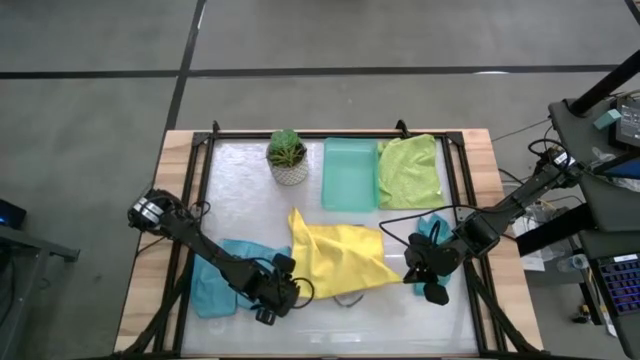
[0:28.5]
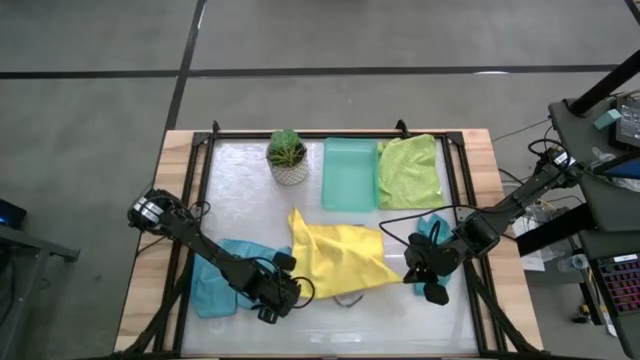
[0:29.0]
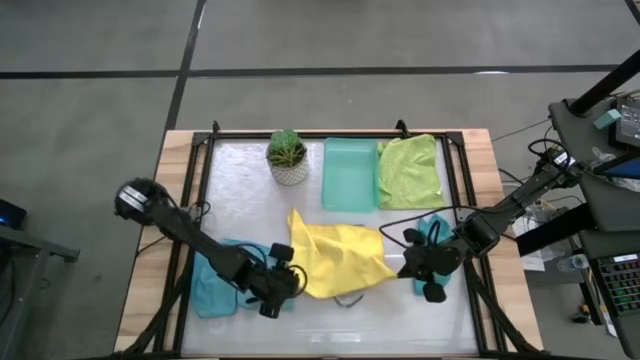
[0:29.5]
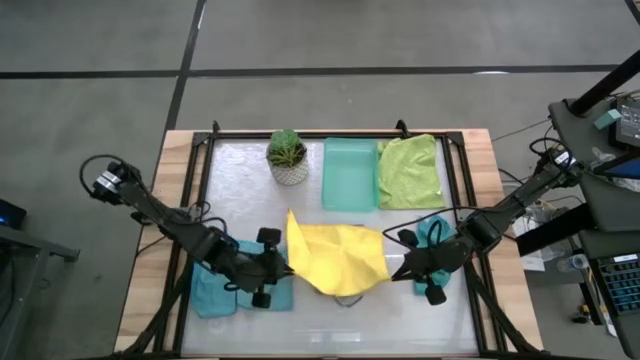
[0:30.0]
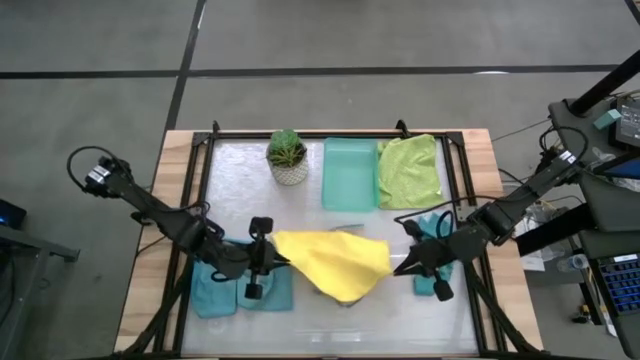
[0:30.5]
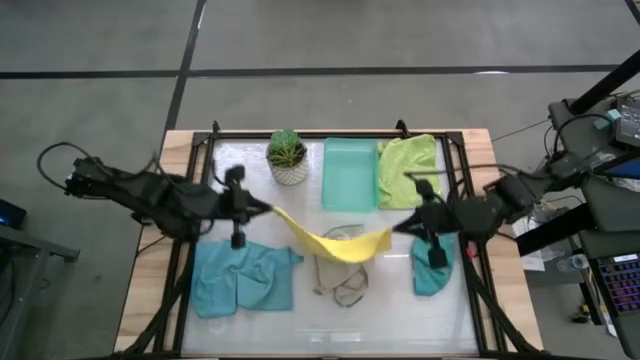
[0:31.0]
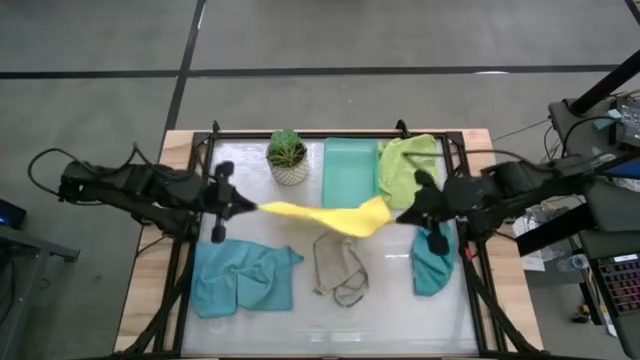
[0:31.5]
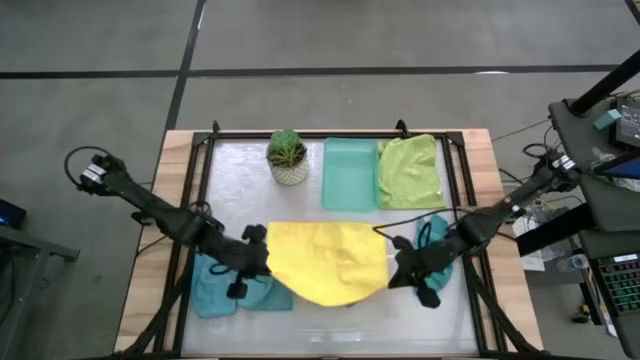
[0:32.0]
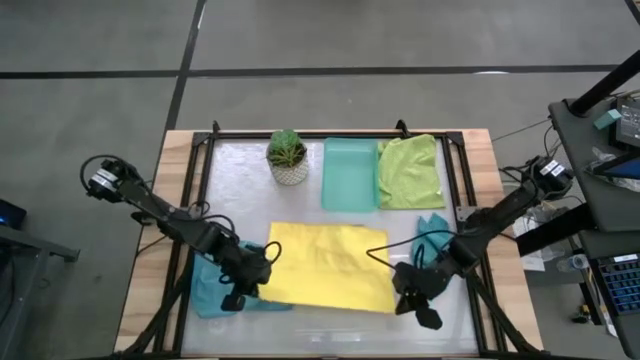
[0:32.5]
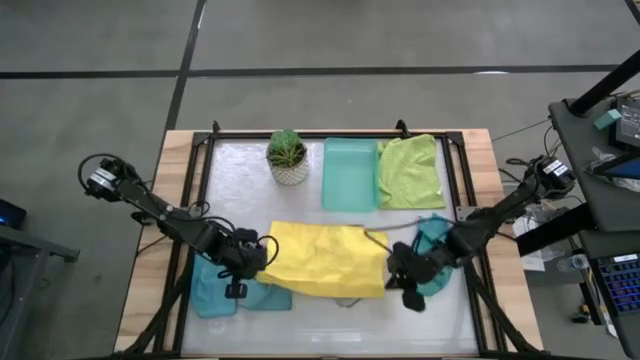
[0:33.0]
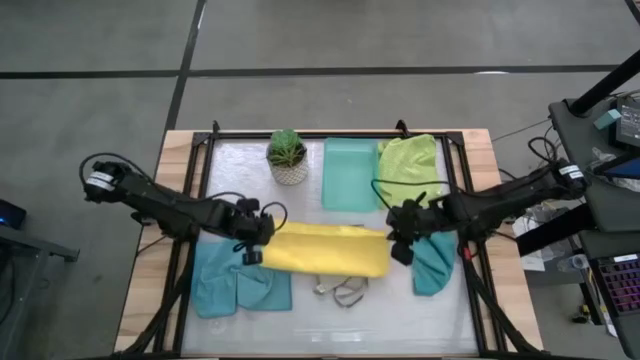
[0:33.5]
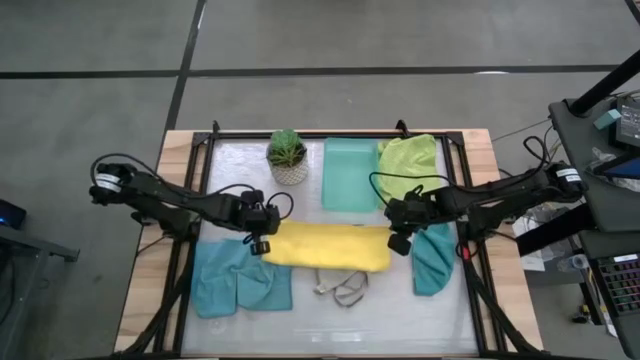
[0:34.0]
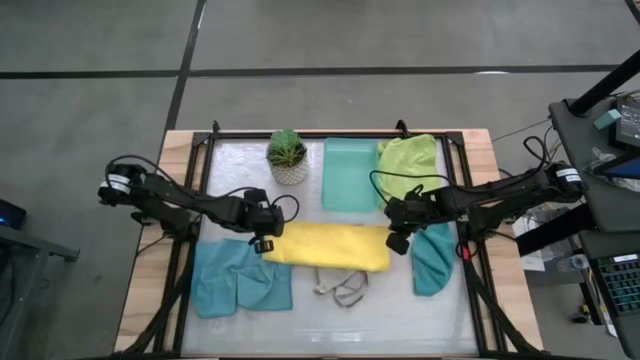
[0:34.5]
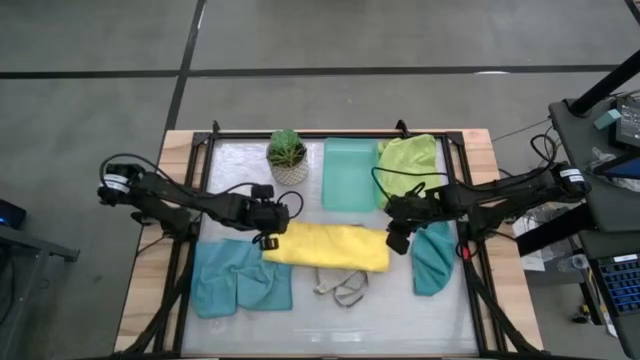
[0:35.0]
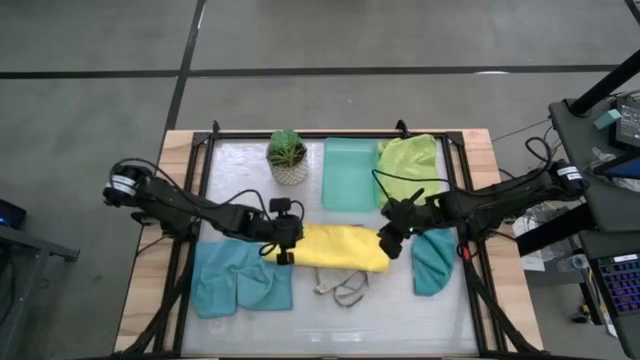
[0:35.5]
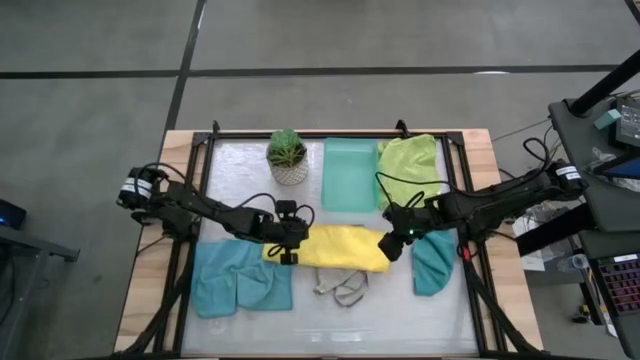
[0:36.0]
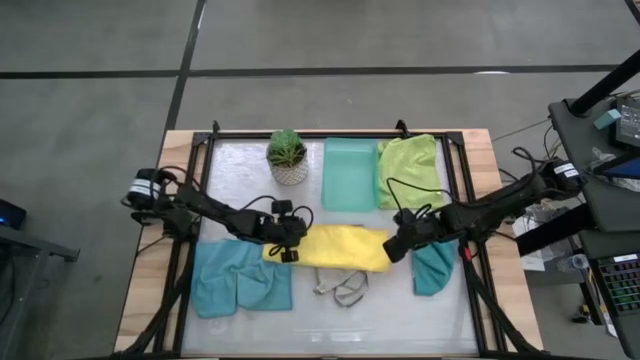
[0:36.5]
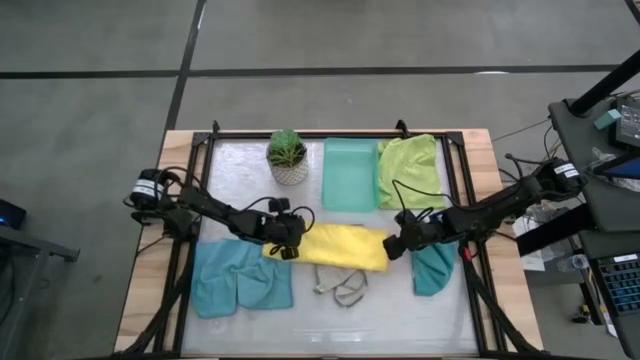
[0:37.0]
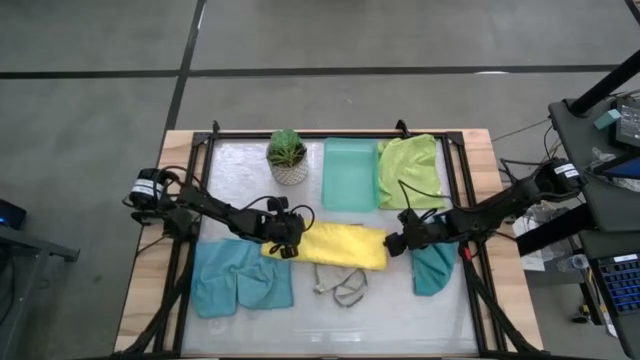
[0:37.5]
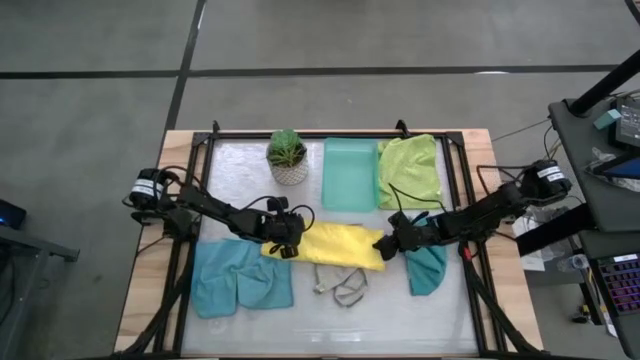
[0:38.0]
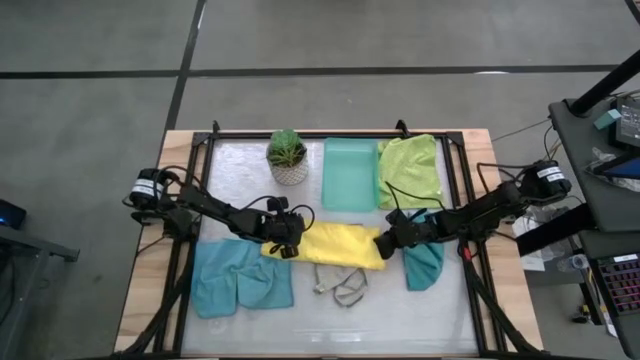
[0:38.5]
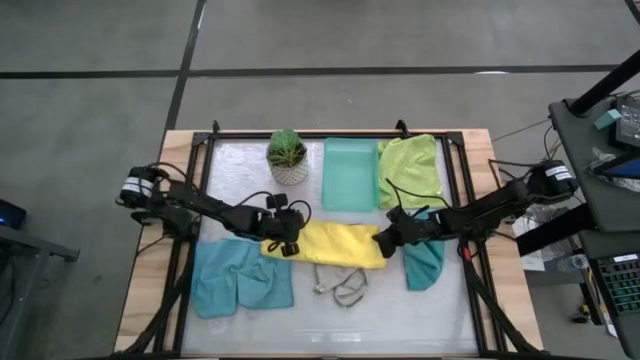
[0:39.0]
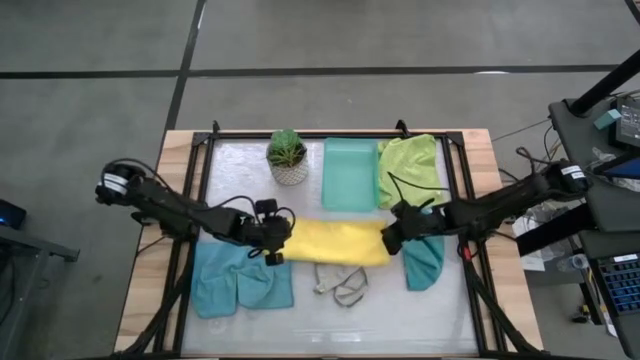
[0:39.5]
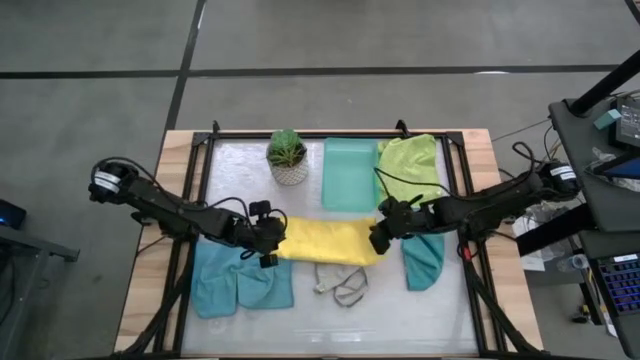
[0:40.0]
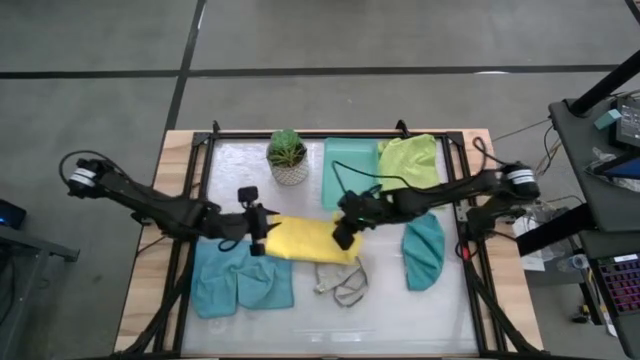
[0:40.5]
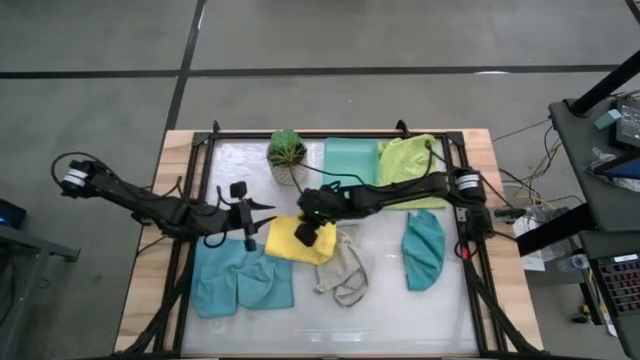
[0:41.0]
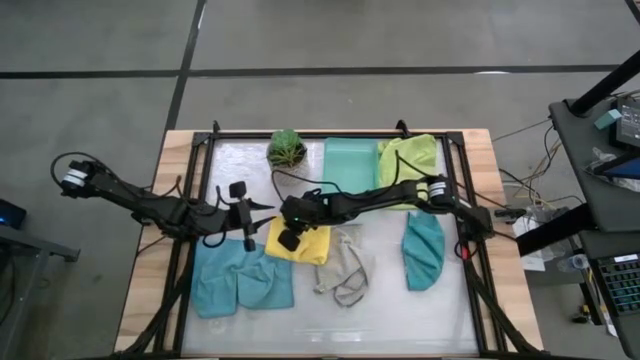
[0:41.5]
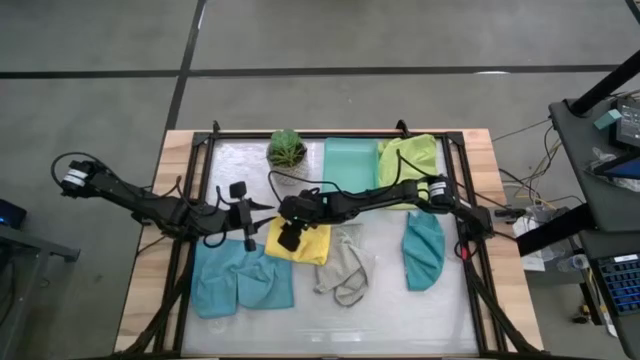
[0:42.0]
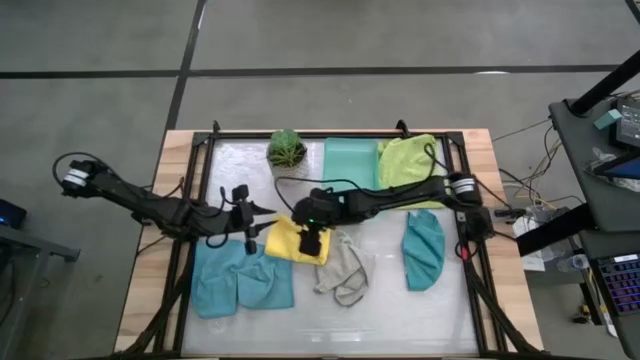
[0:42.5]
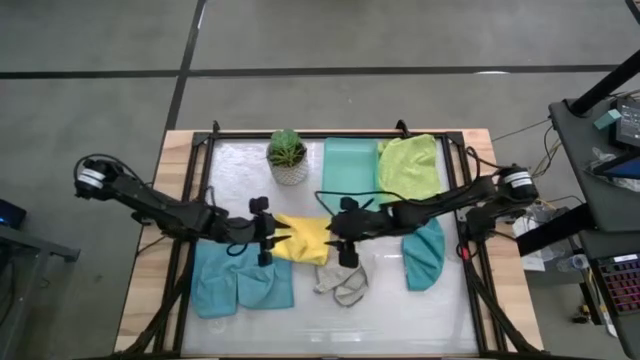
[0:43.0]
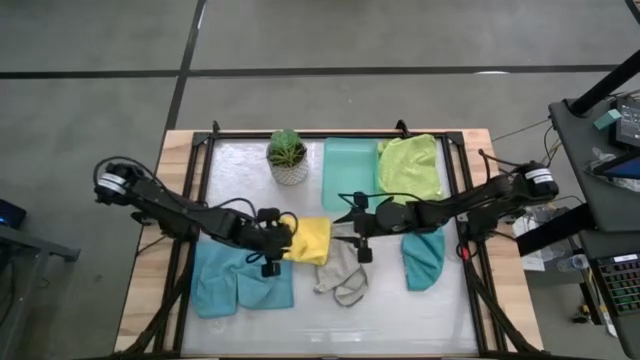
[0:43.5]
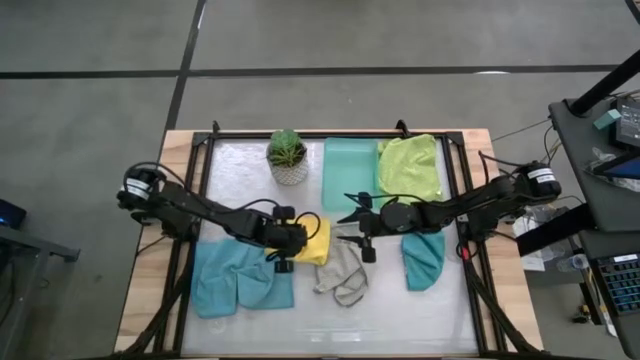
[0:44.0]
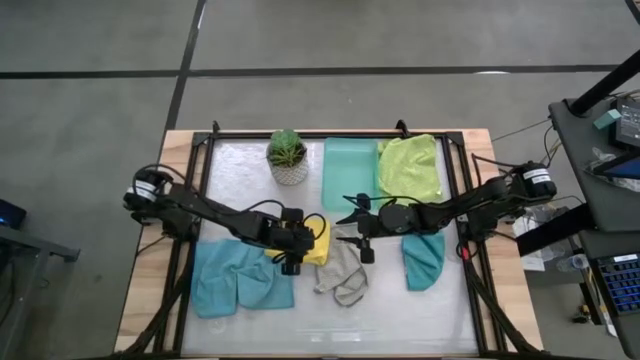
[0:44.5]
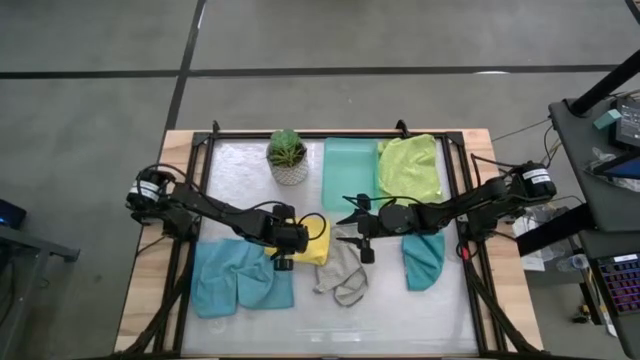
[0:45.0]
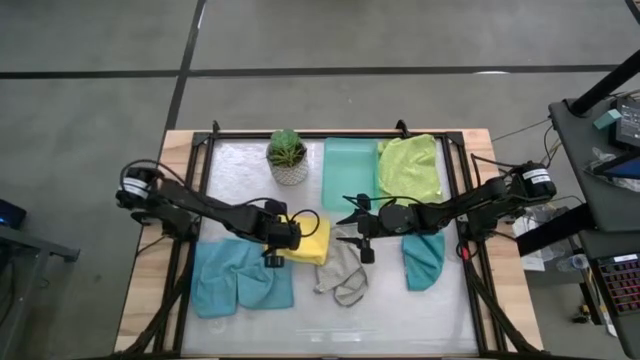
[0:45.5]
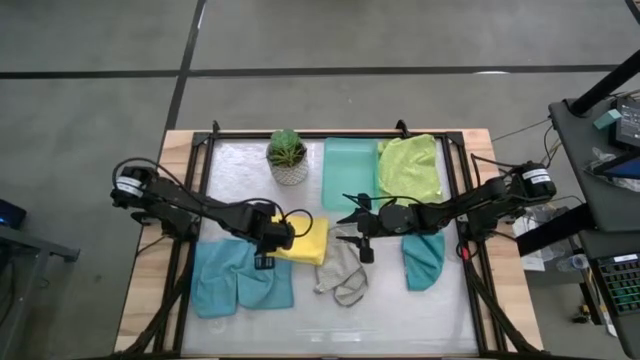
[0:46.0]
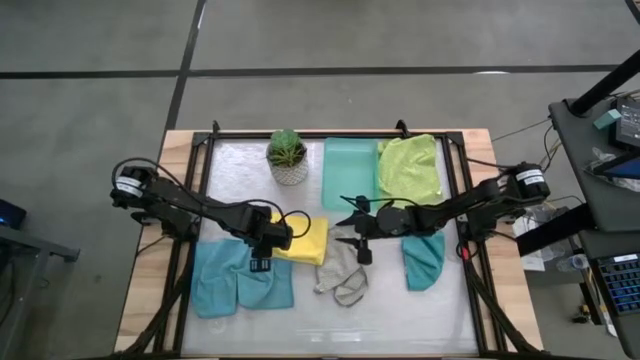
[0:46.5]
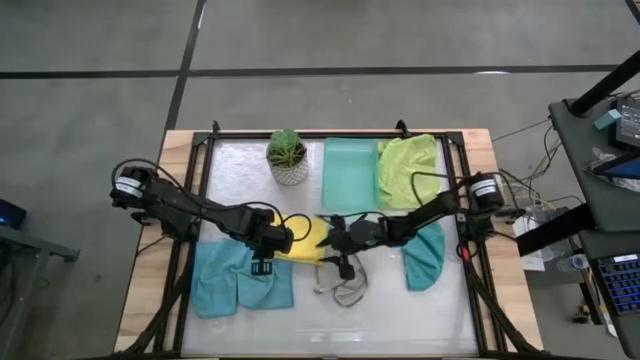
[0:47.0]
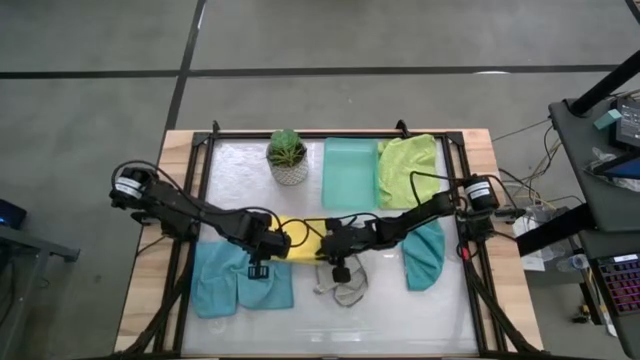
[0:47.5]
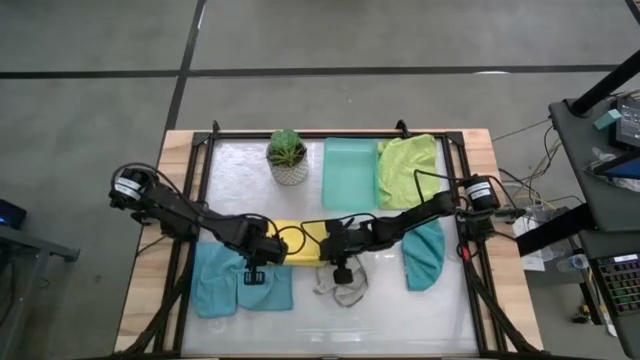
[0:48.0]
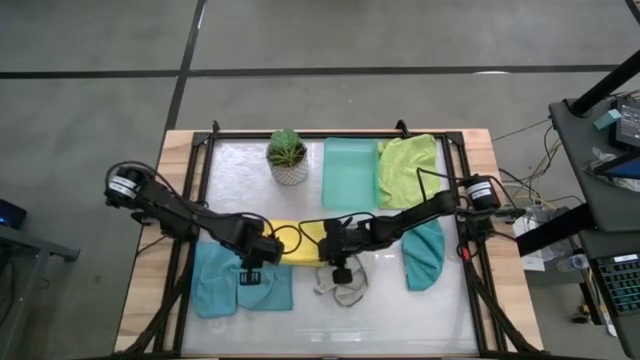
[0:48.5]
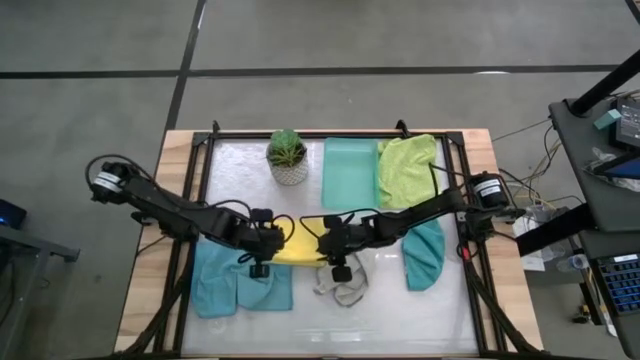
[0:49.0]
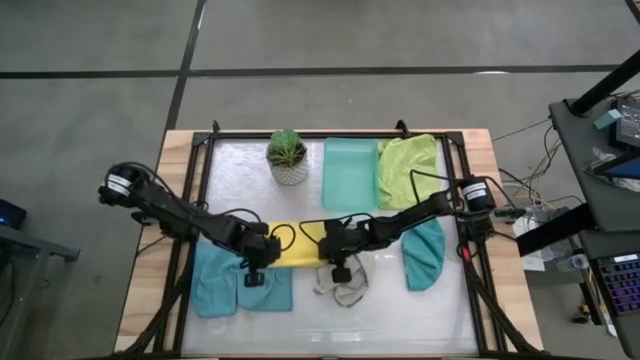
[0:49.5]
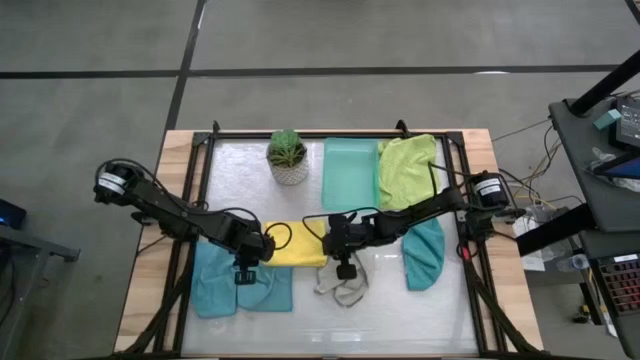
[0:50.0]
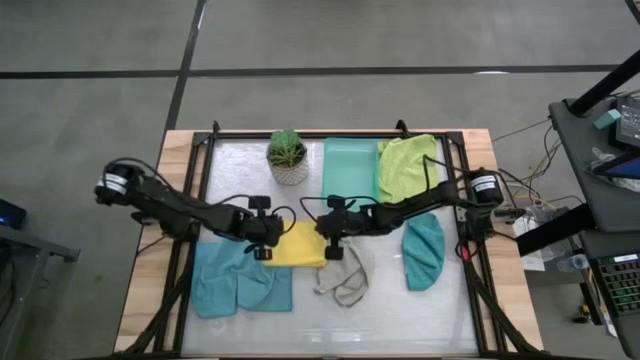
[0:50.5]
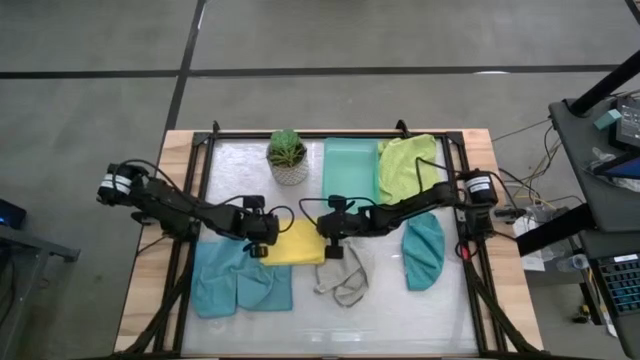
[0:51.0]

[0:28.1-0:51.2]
Task: Fold microfiber towels
Fold the yellow microfiber cloth
